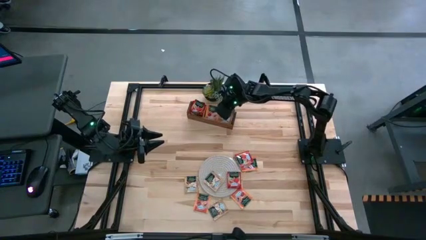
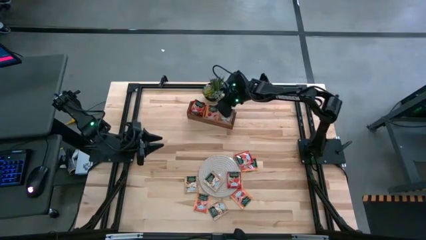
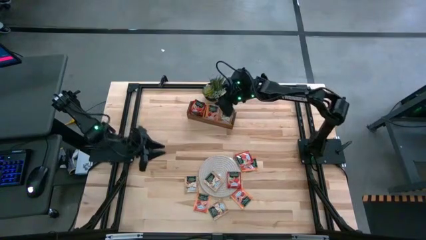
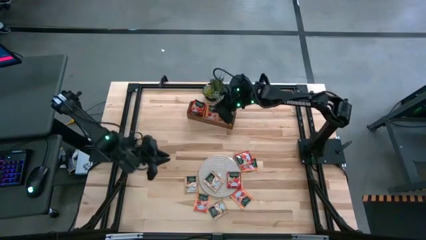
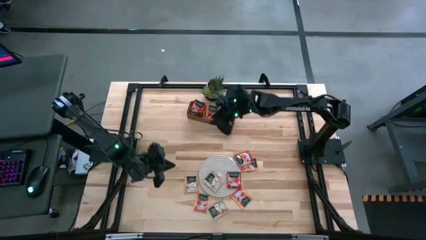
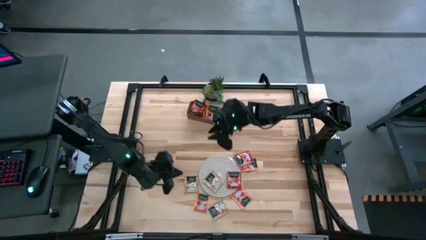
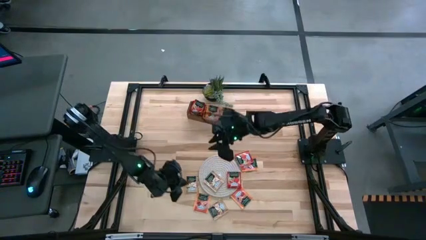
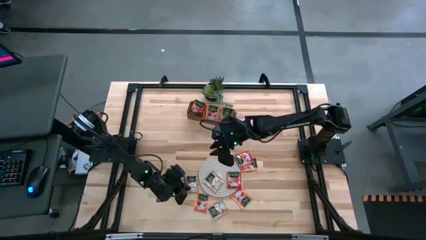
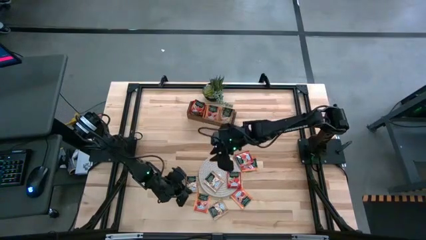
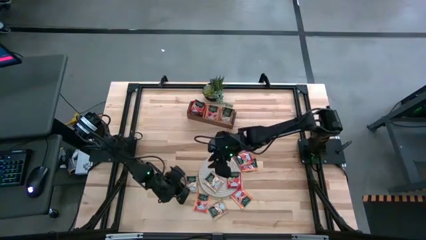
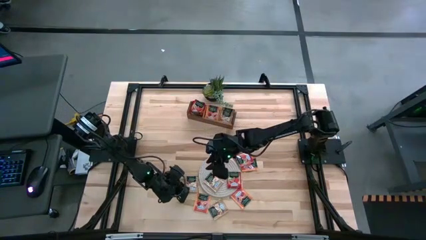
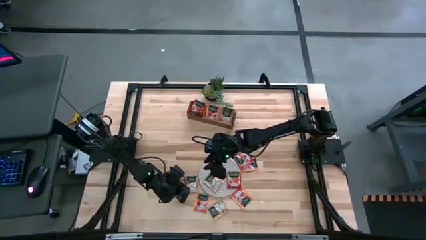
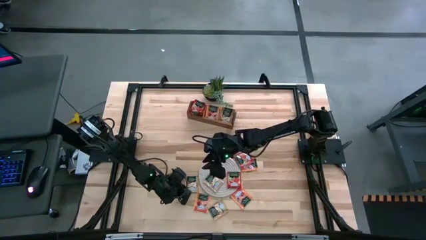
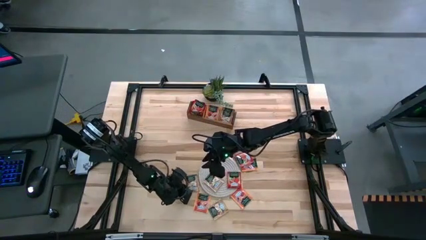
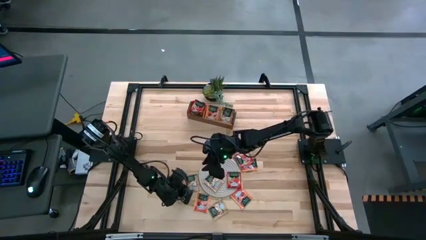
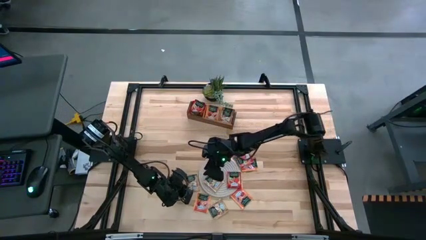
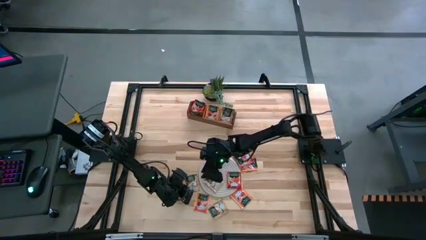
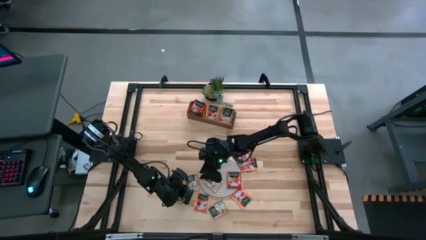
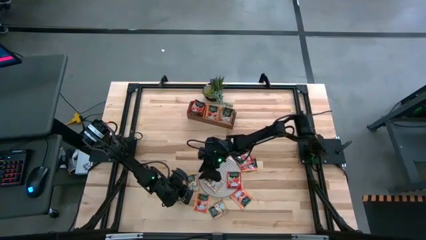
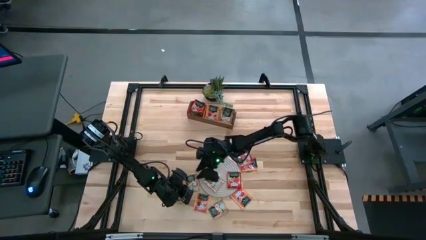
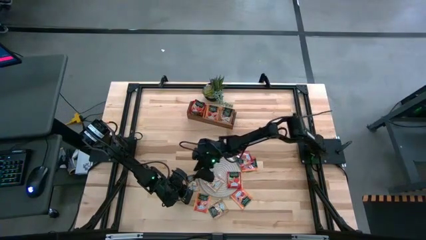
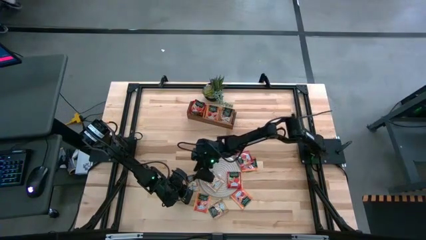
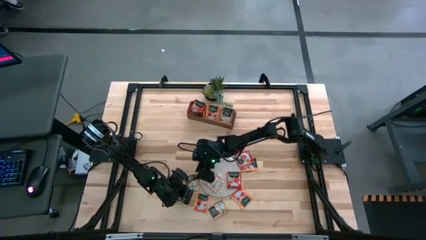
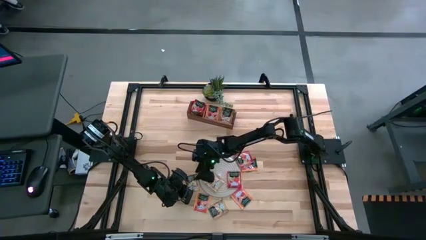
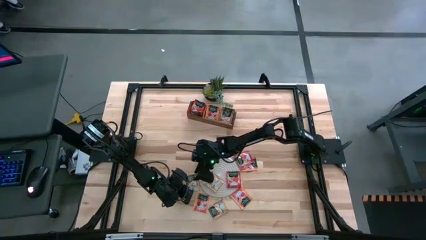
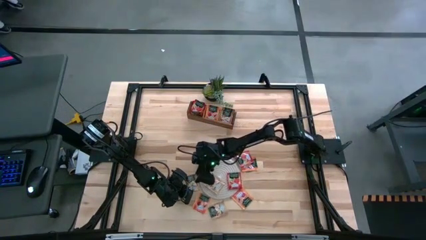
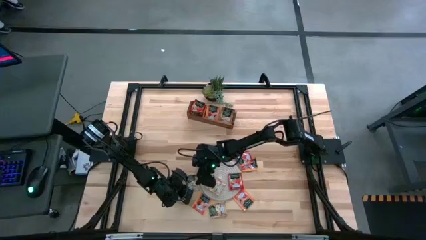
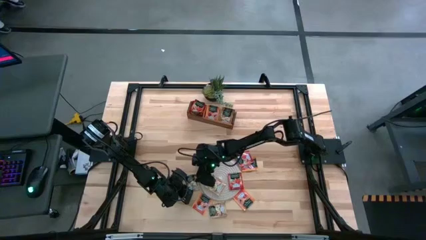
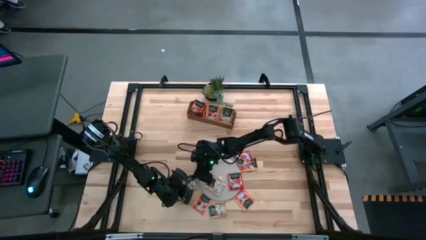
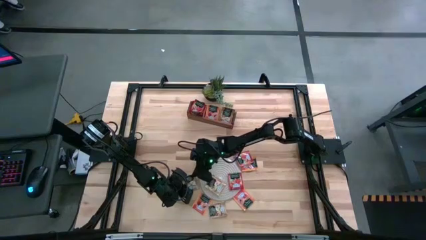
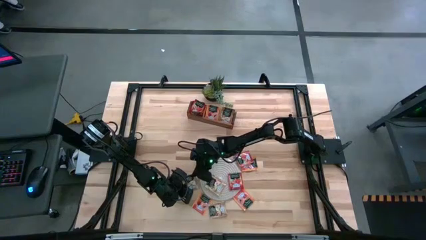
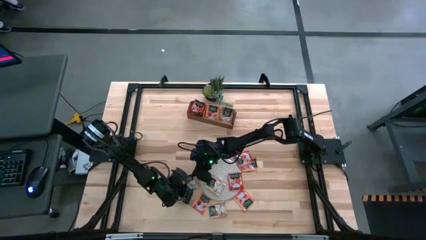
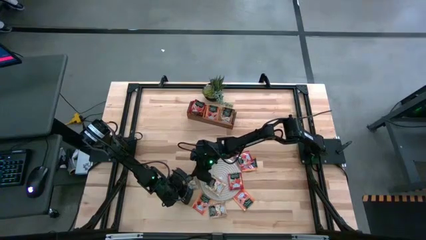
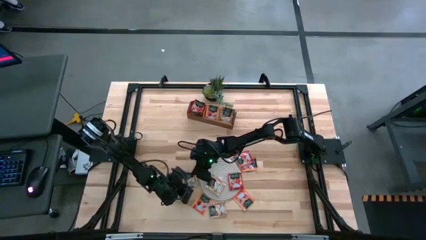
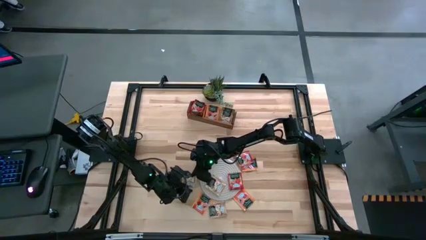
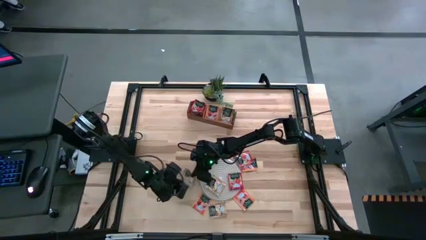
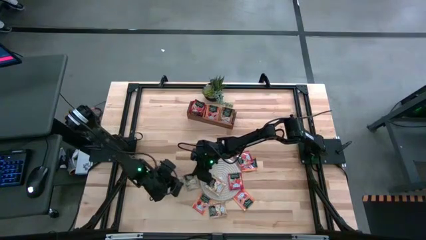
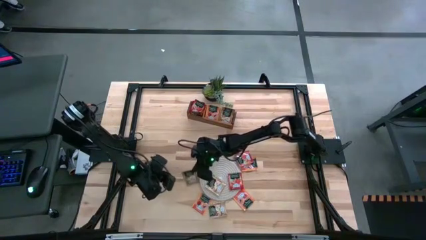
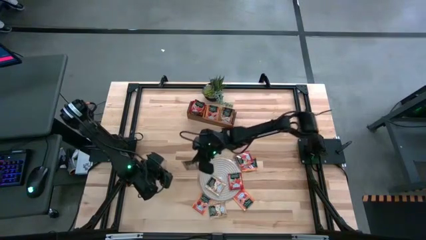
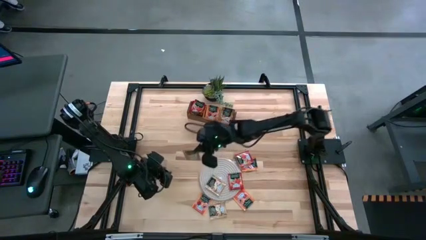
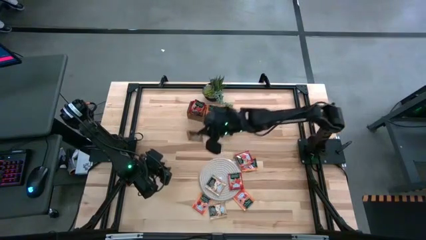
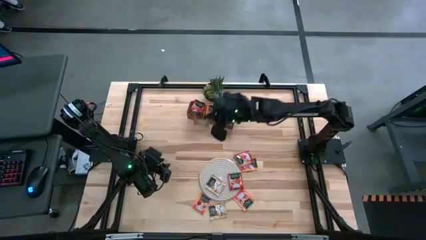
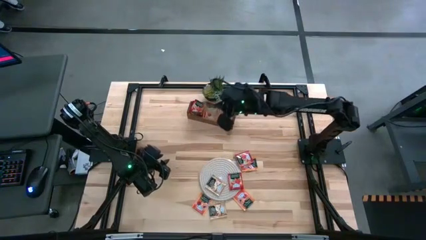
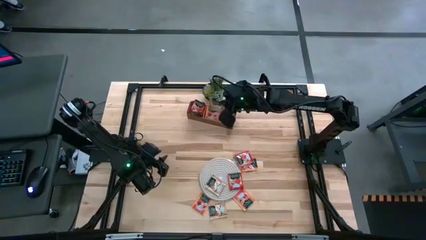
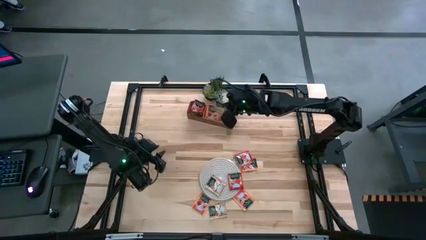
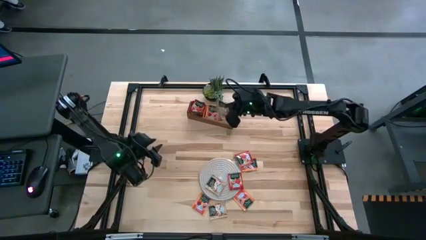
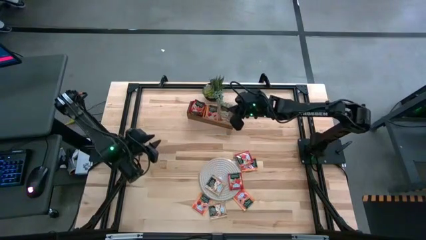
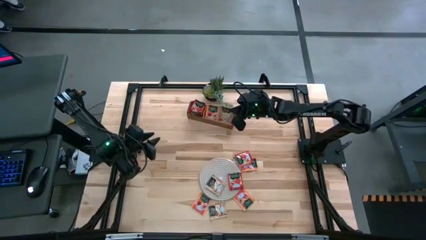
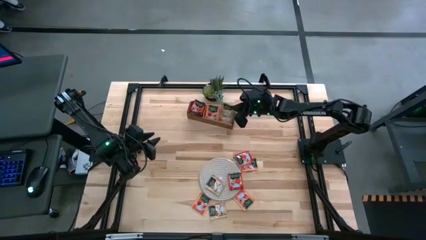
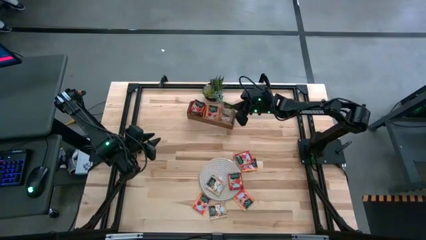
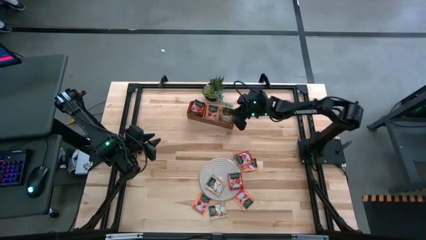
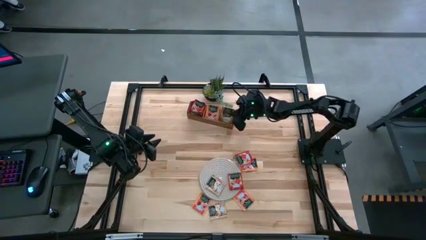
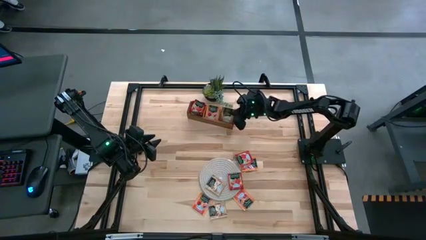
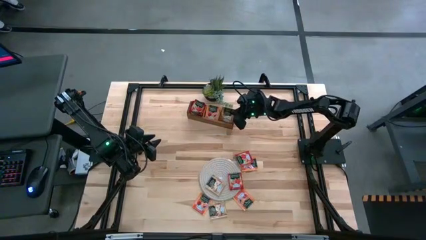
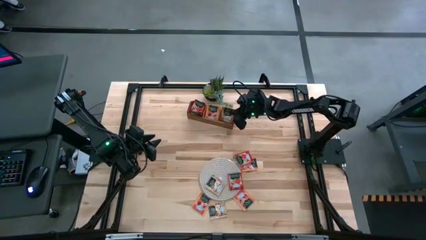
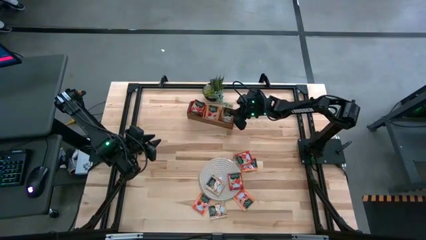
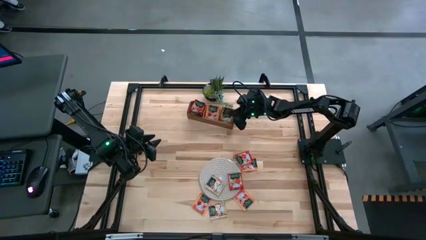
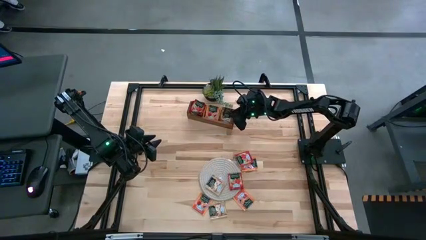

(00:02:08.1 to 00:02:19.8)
Task: Pick & Place Tea
Put the light brown tea bag into the right section of the wooden organizer

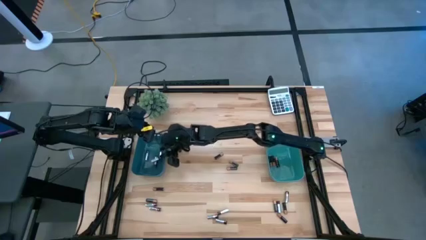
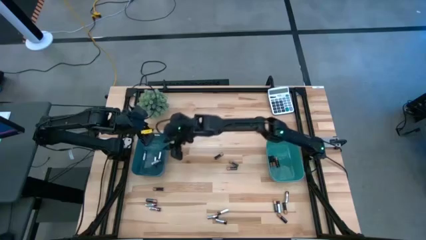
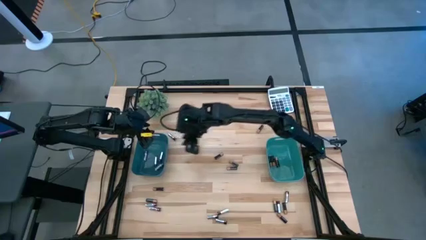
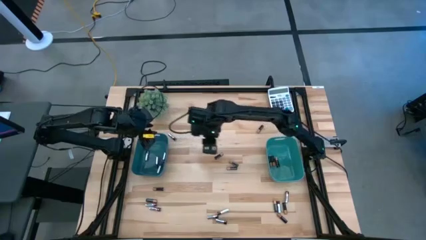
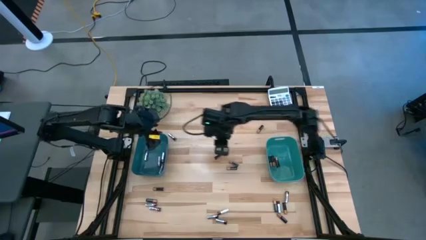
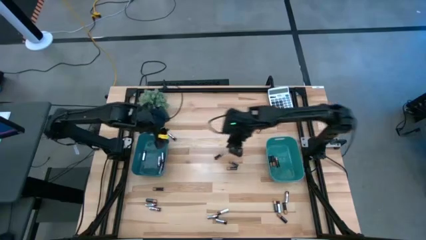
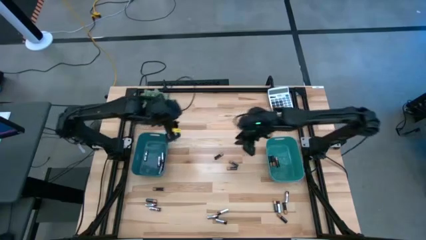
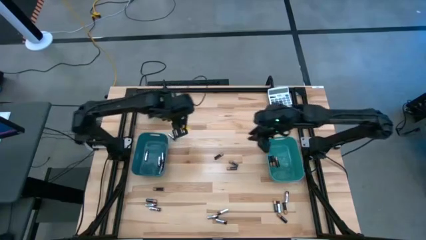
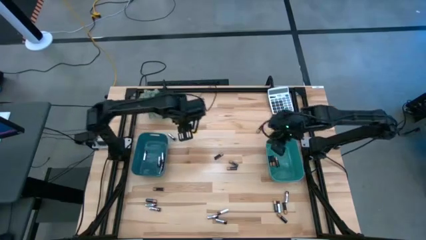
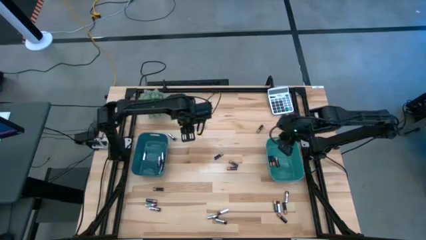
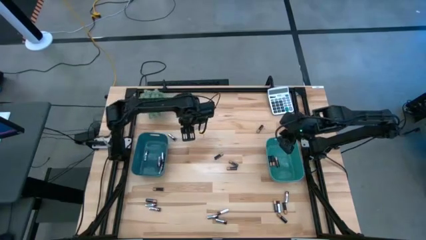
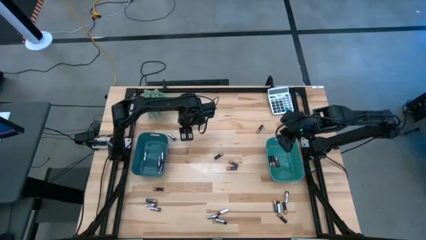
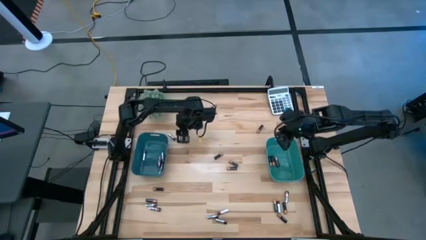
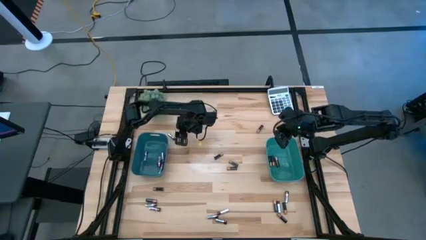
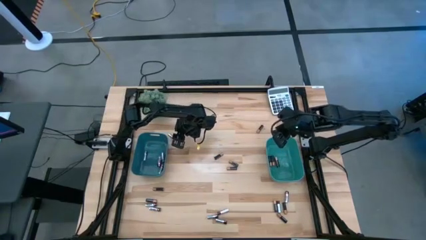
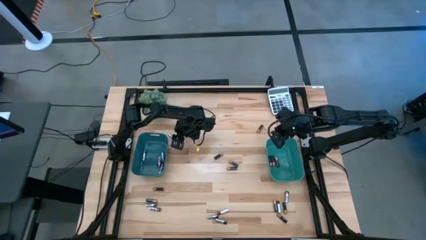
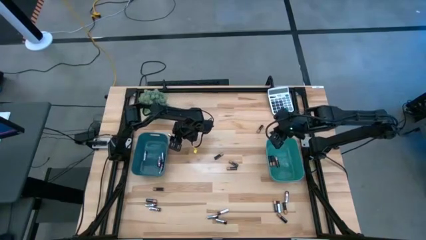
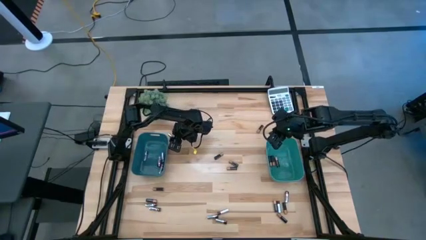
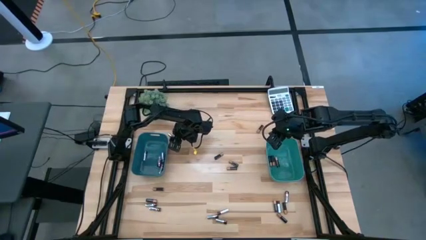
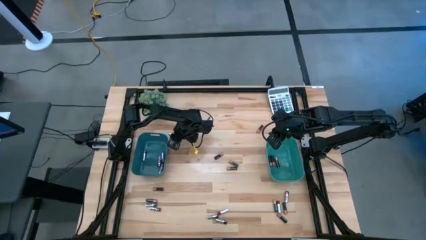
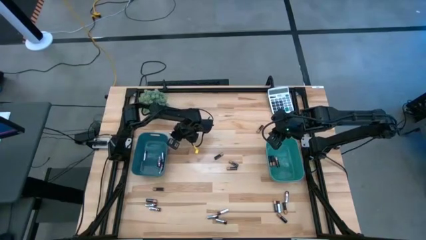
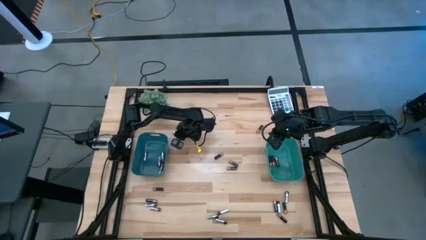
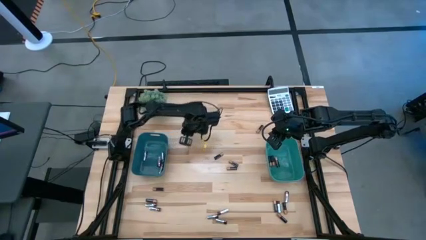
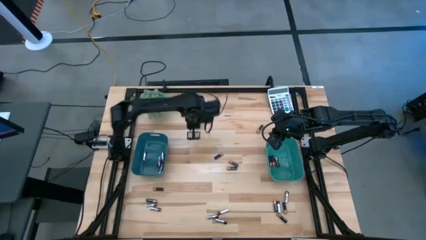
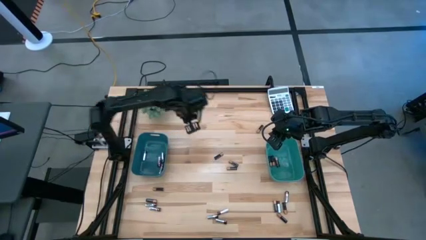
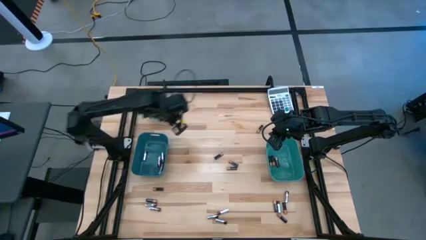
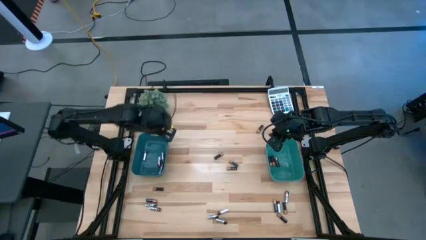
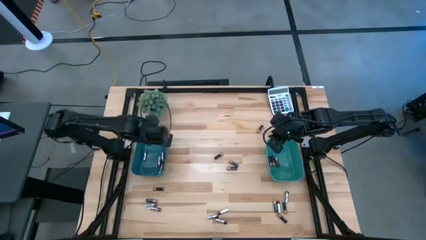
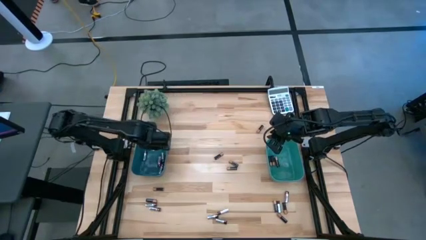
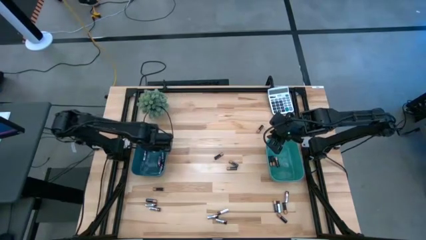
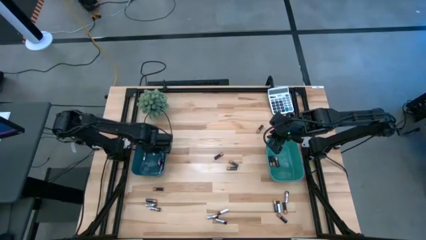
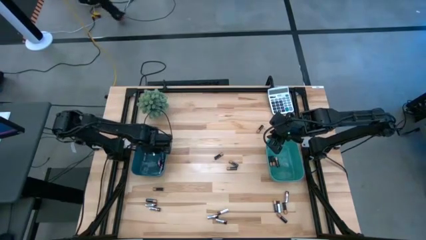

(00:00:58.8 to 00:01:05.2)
Task: Sort batteries
Put the silver battery into the blue bin
